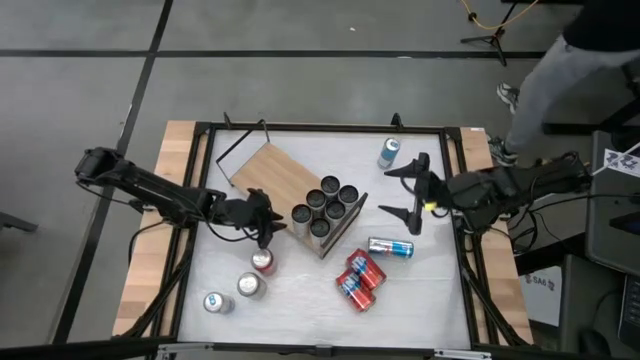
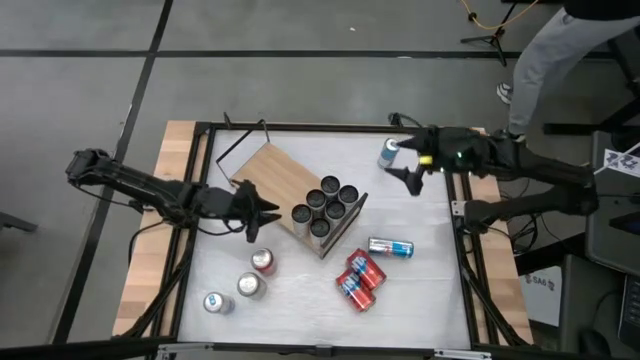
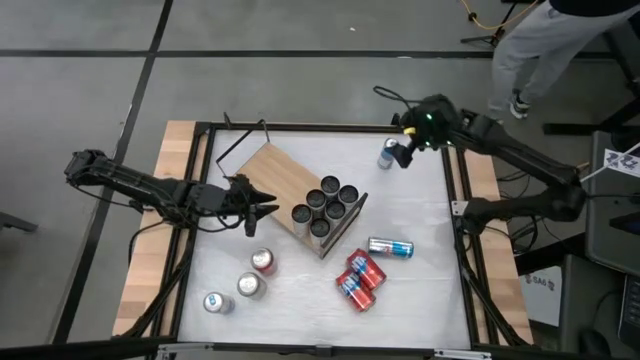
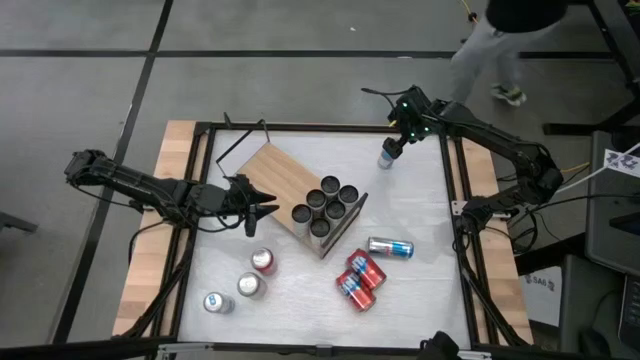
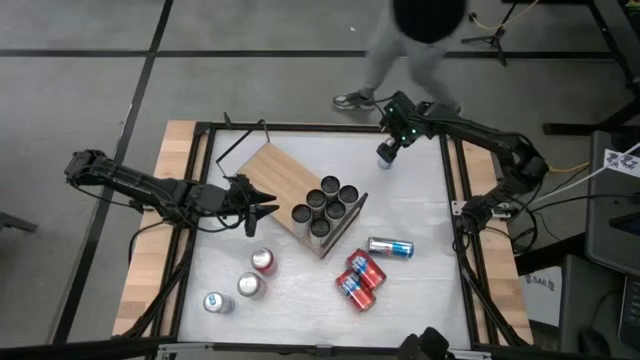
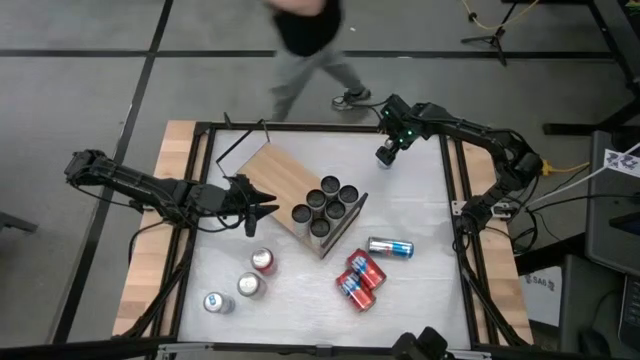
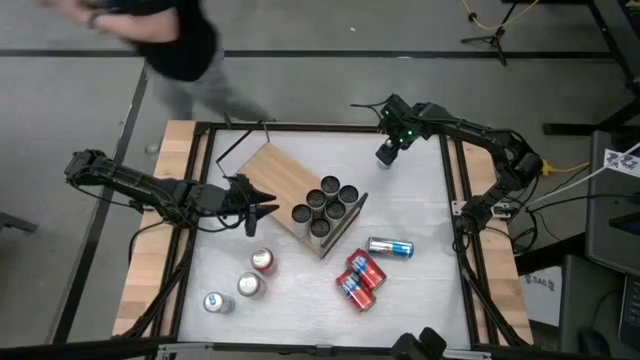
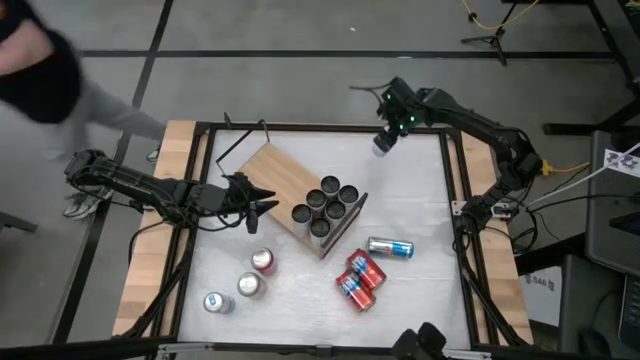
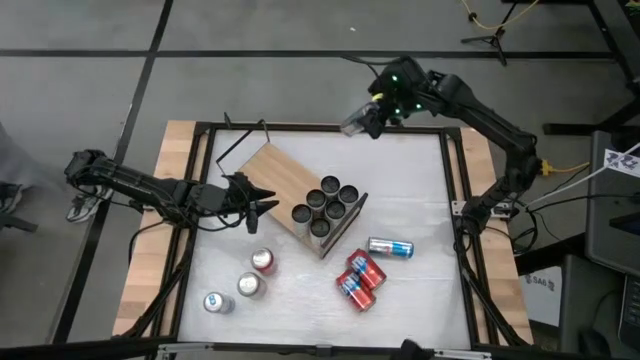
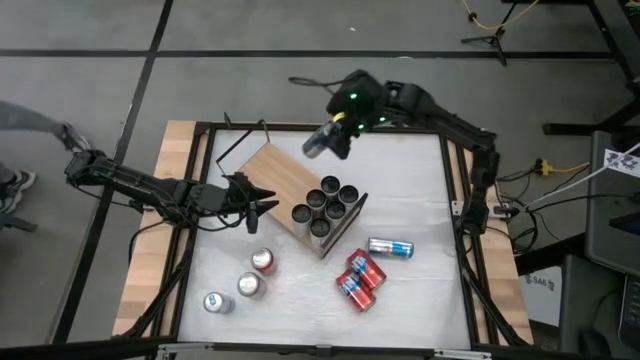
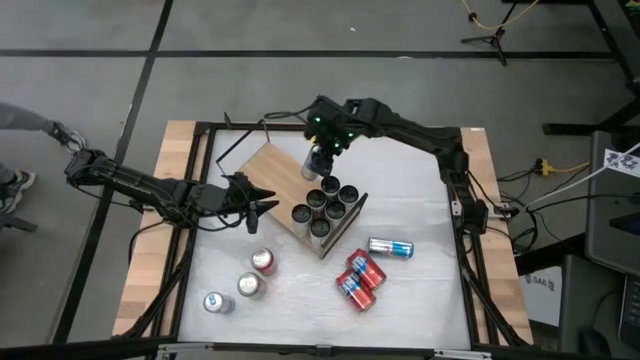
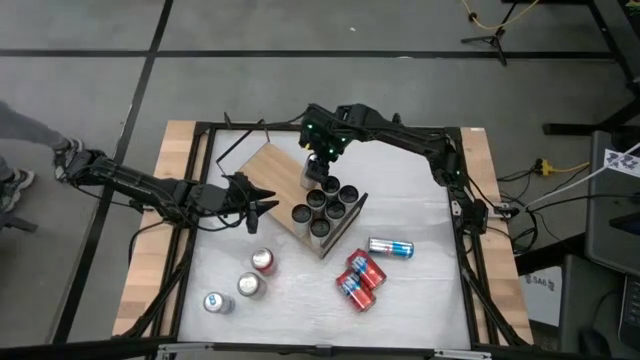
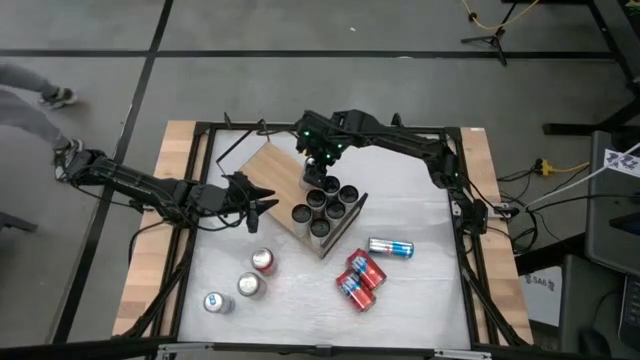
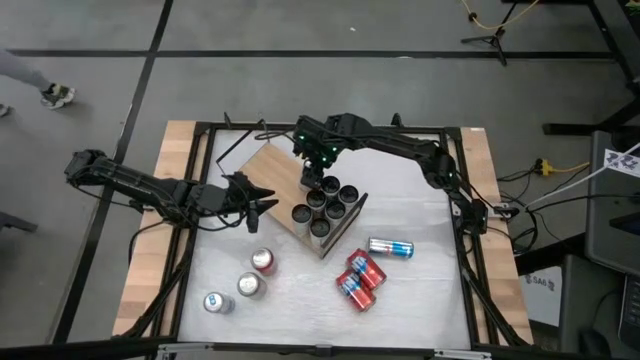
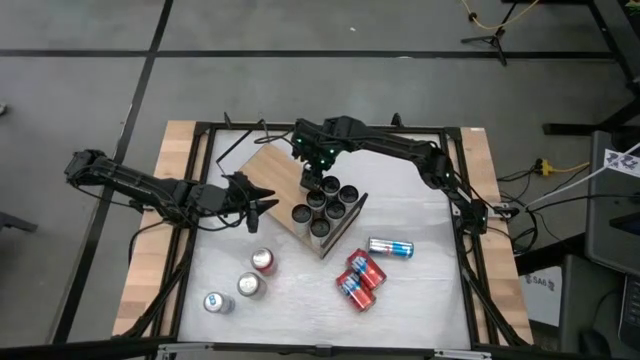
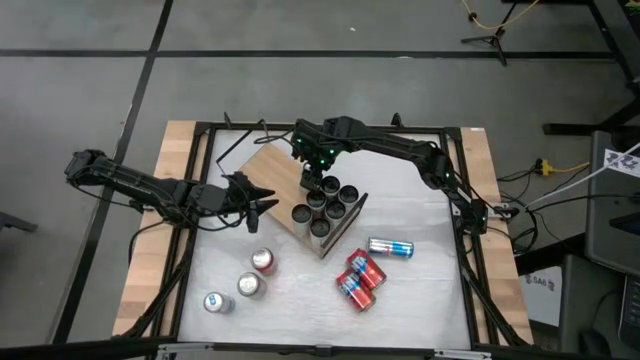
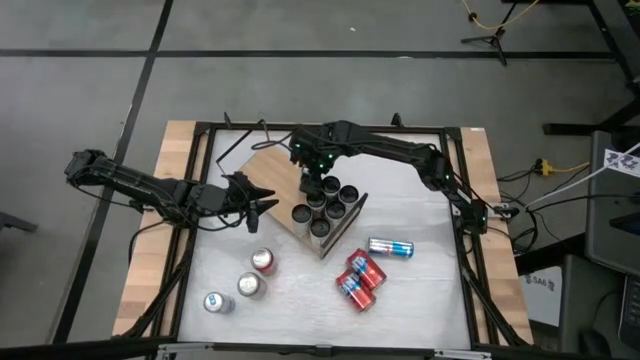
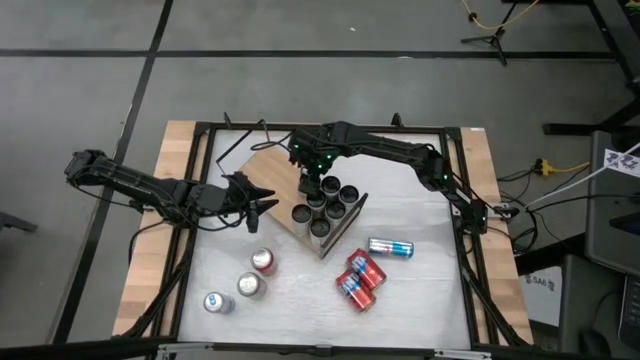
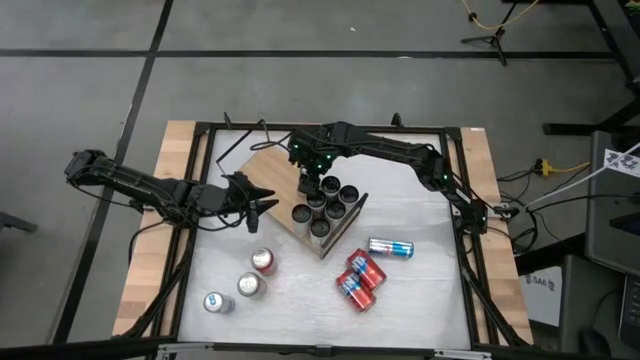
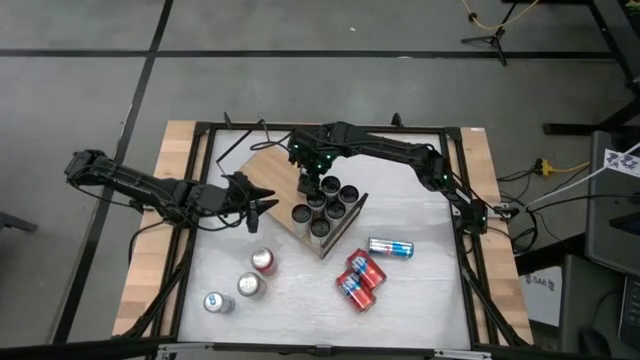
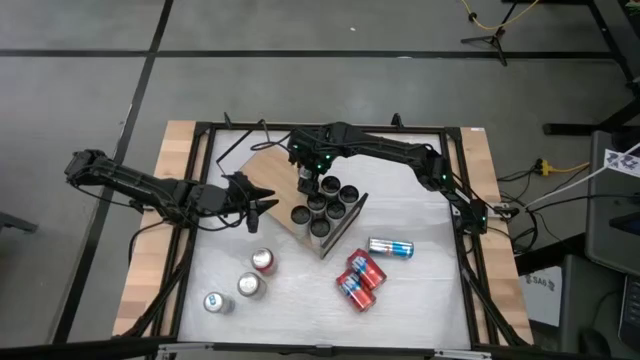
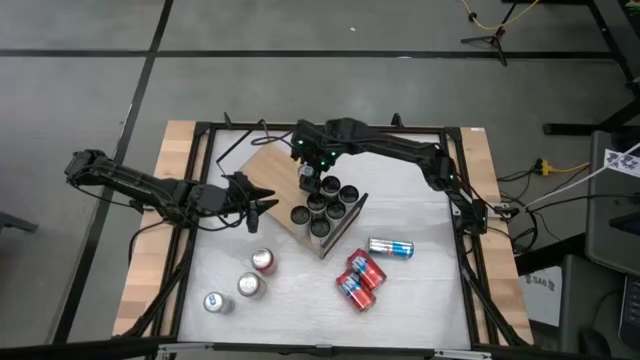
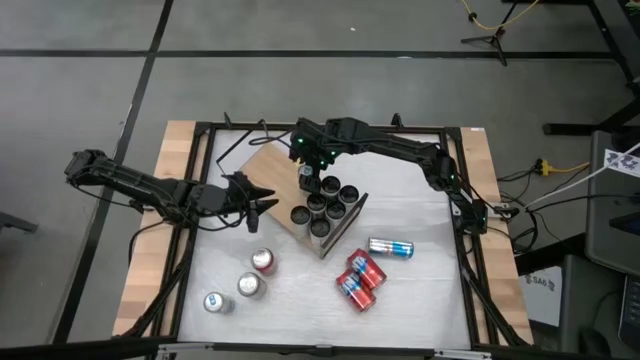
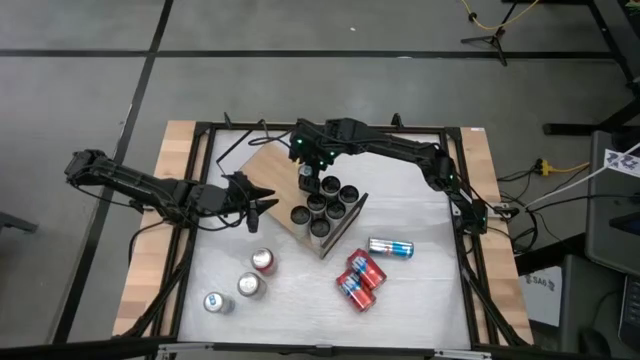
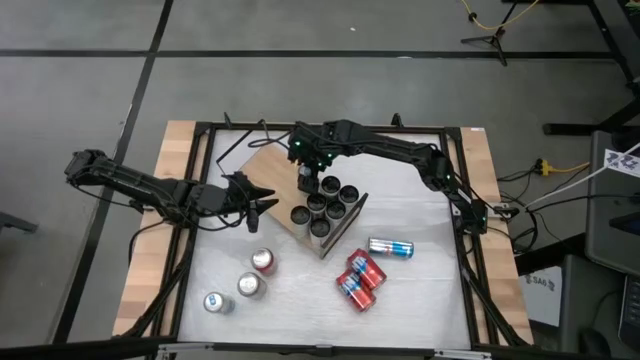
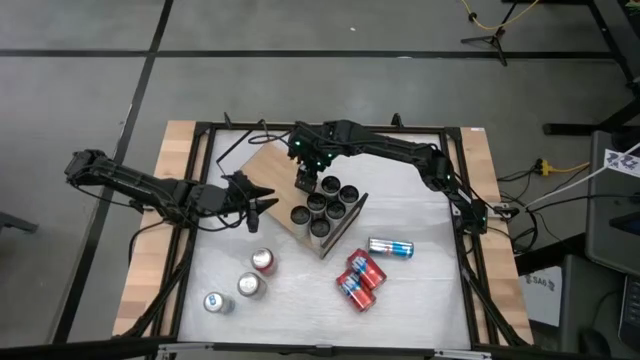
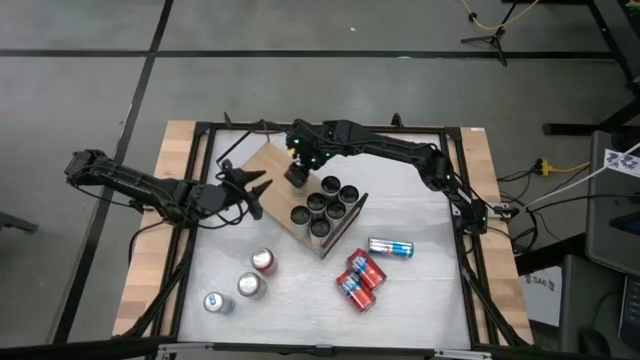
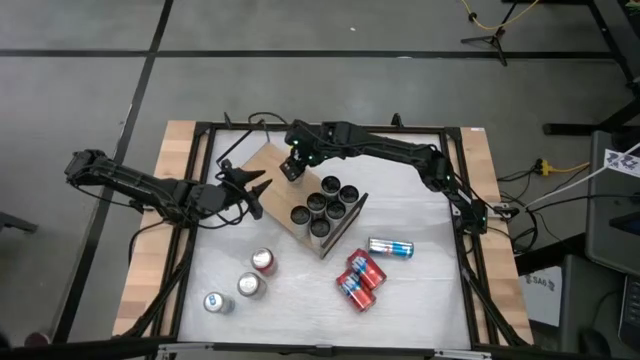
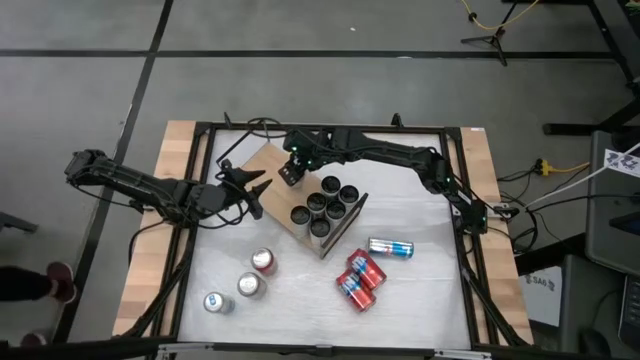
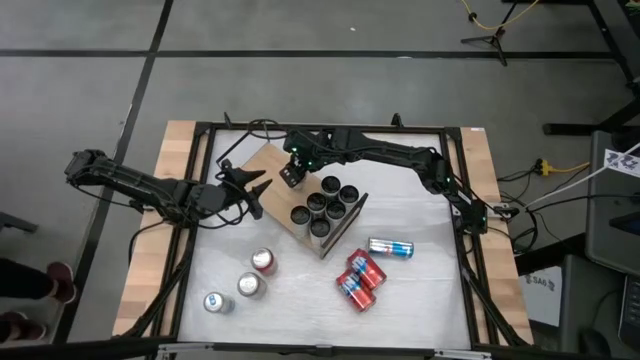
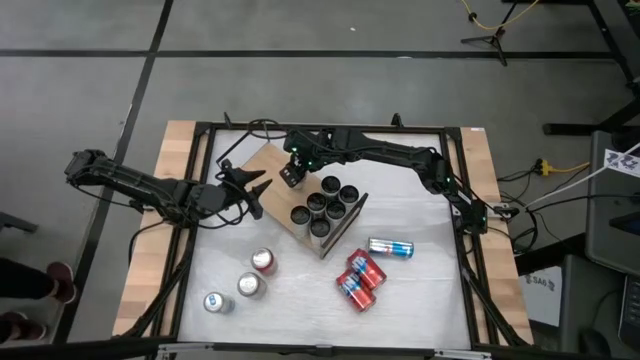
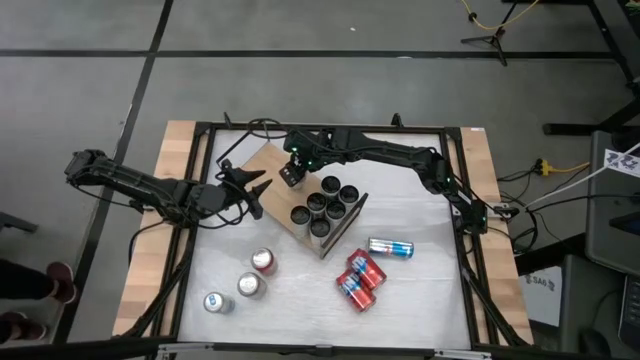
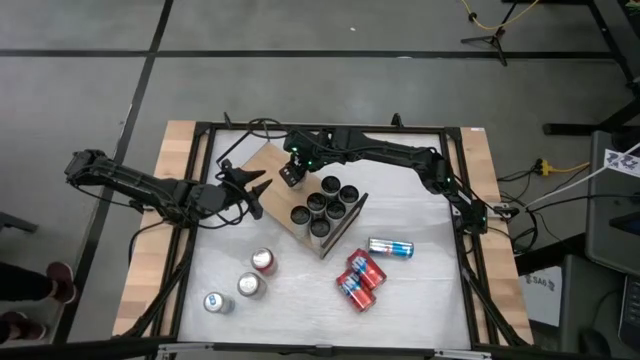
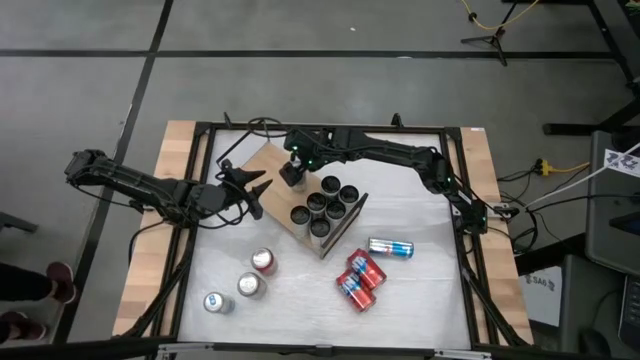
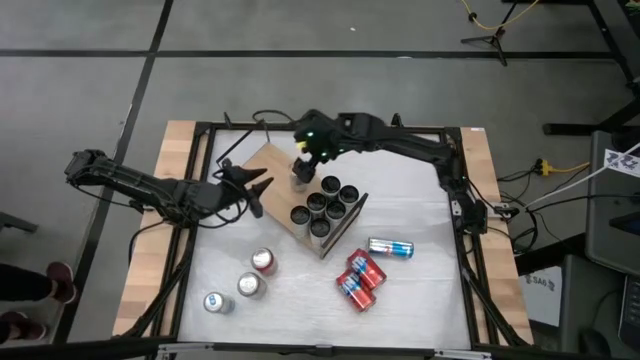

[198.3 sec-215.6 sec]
Task: Place canned beverage on shelf
Put the top right blue soda can on the shelf
